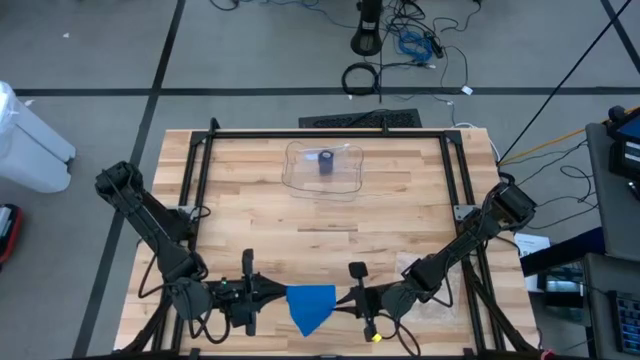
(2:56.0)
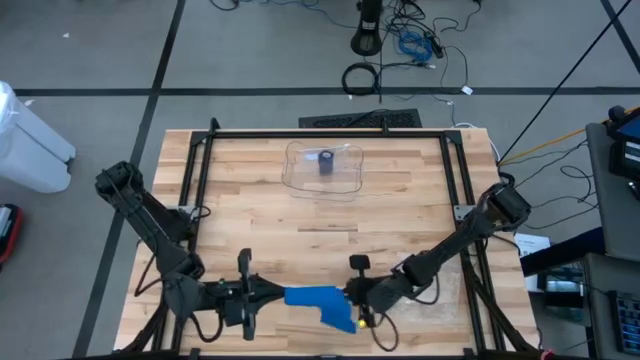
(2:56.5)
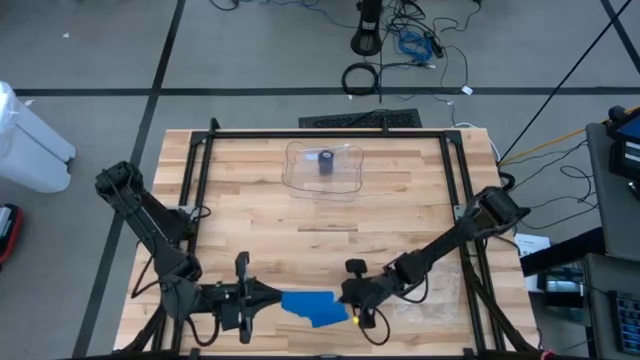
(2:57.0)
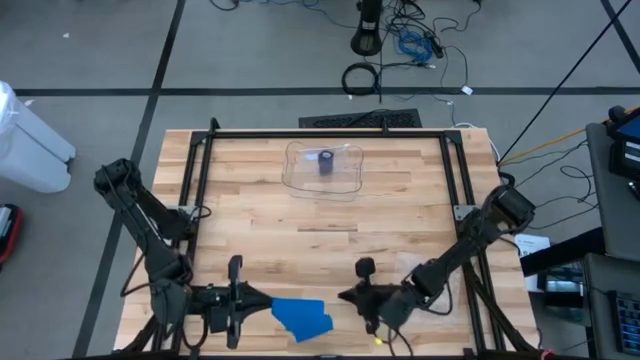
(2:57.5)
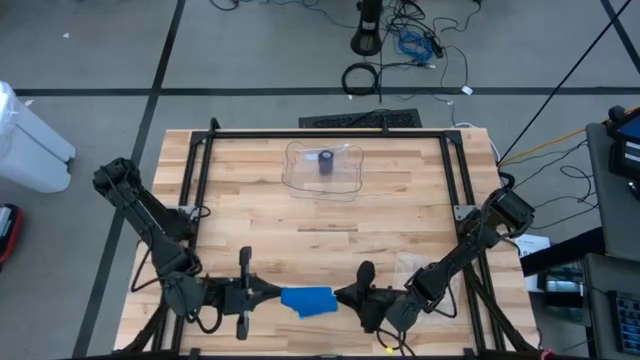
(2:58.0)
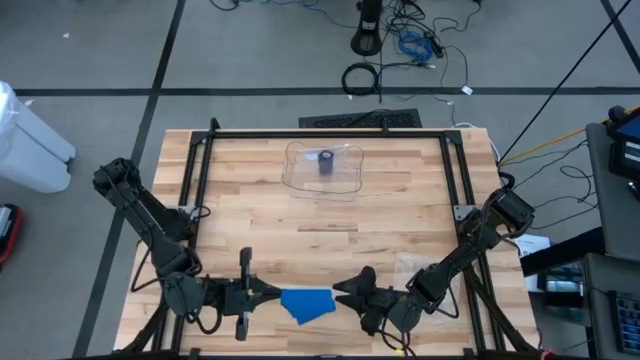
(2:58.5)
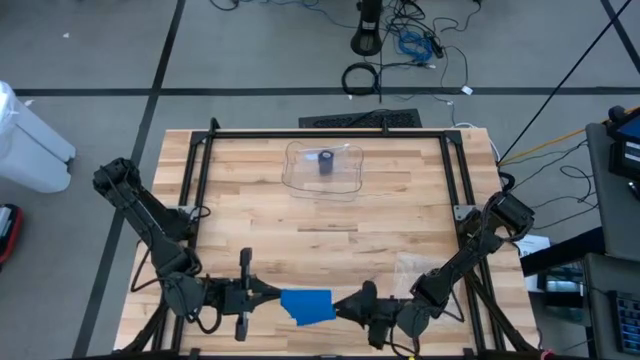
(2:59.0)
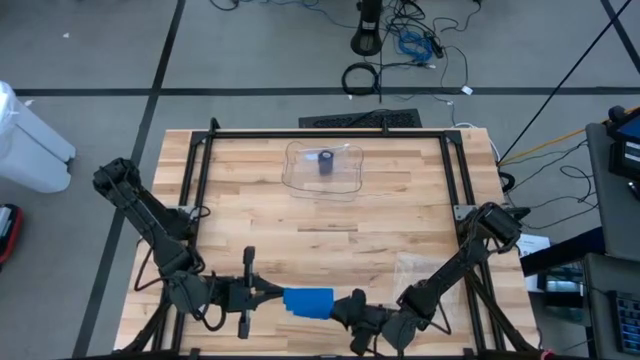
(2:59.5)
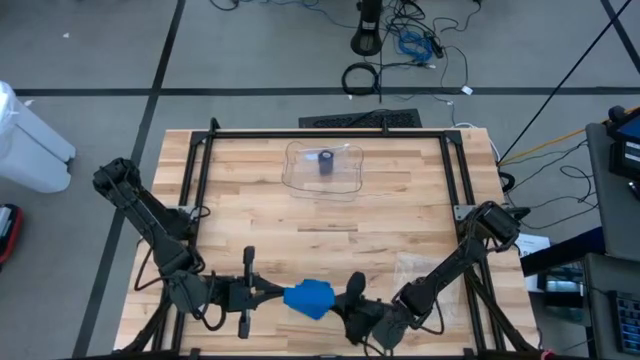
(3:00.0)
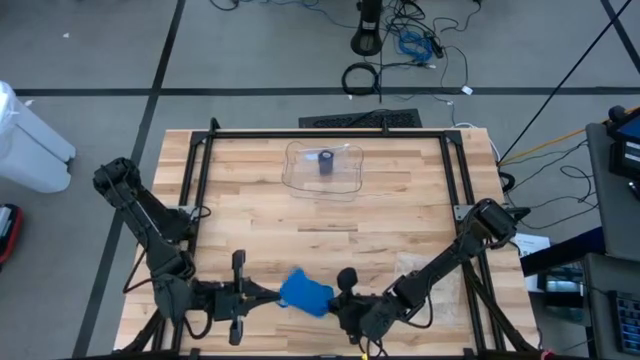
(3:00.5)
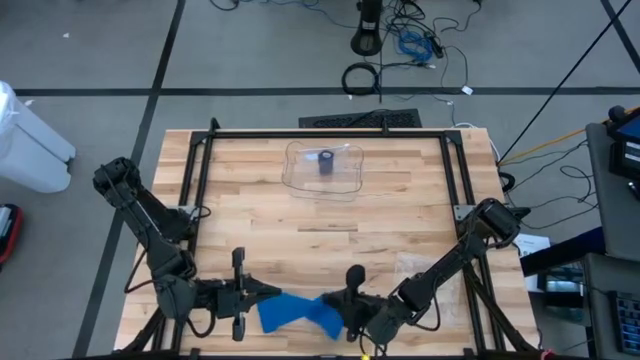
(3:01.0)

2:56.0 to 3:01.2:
Task: Roll bandage
Roll the blue bandage

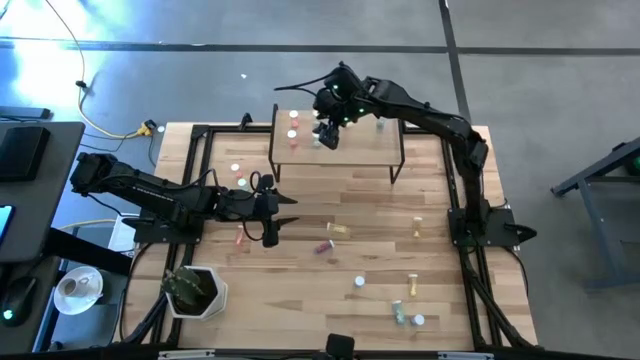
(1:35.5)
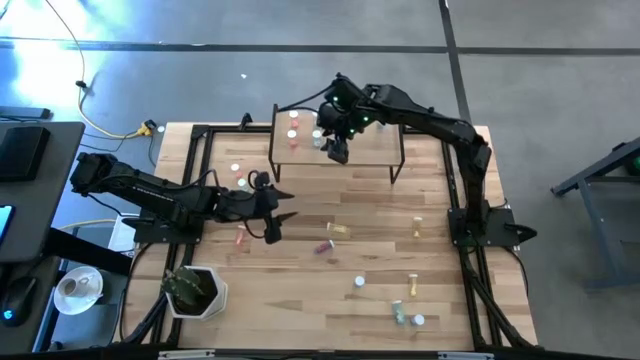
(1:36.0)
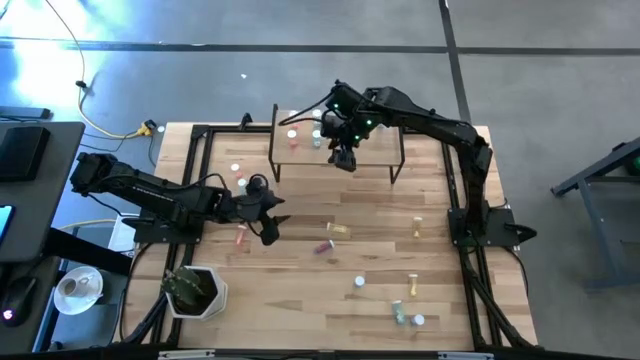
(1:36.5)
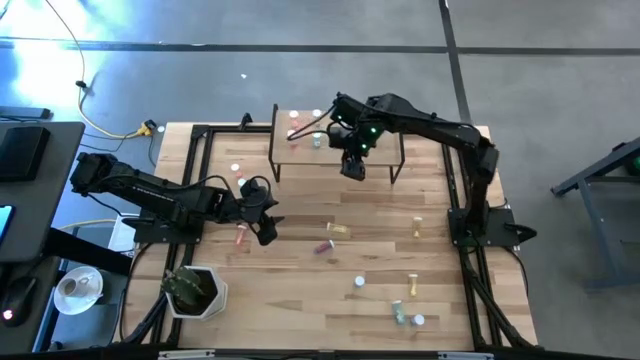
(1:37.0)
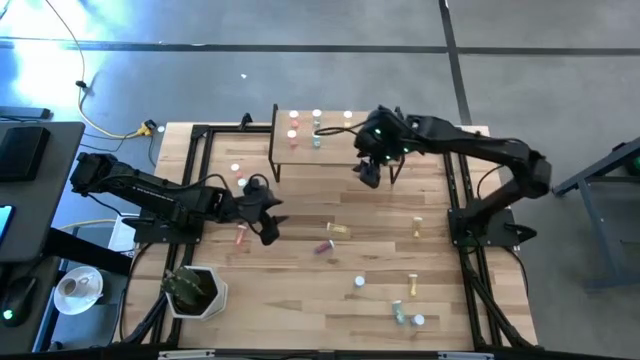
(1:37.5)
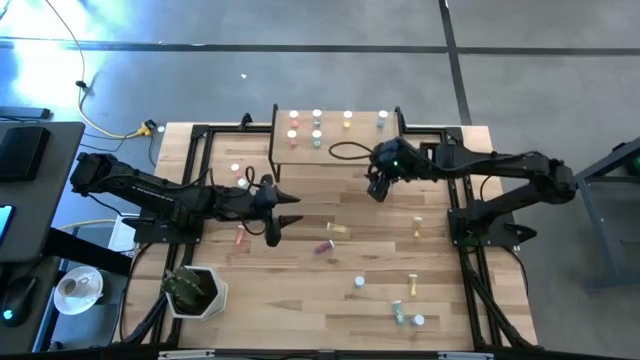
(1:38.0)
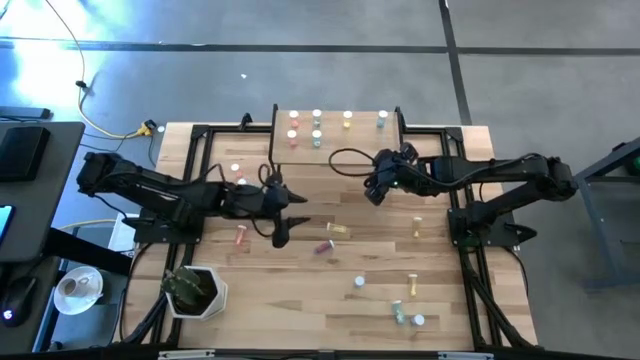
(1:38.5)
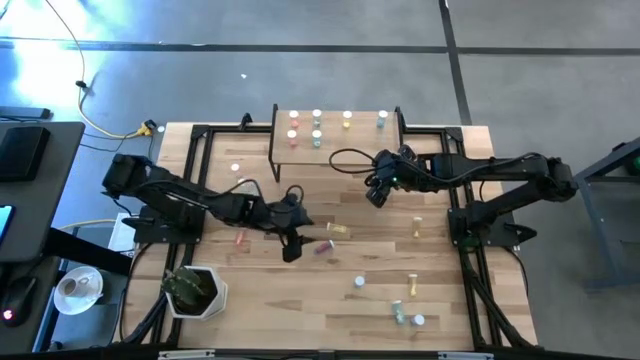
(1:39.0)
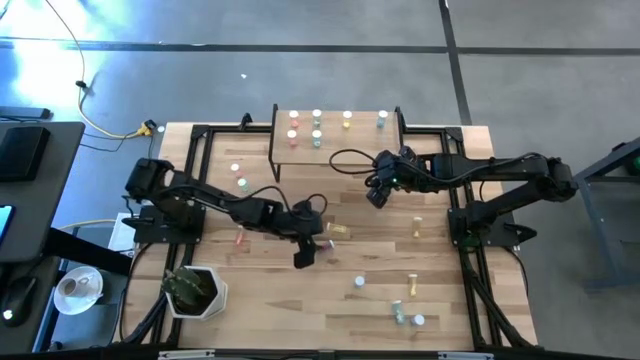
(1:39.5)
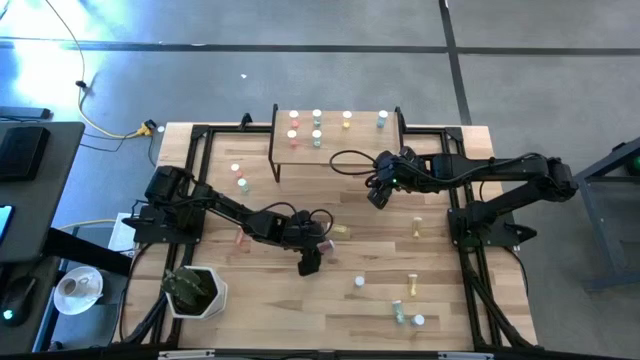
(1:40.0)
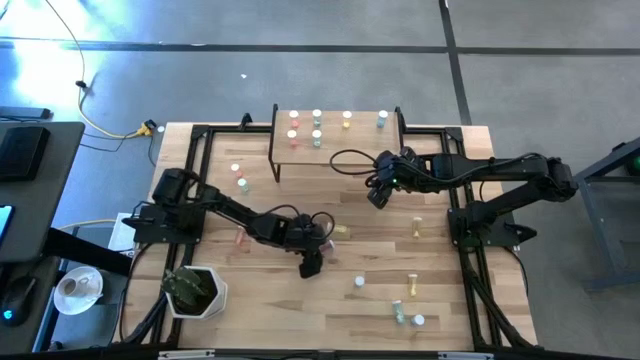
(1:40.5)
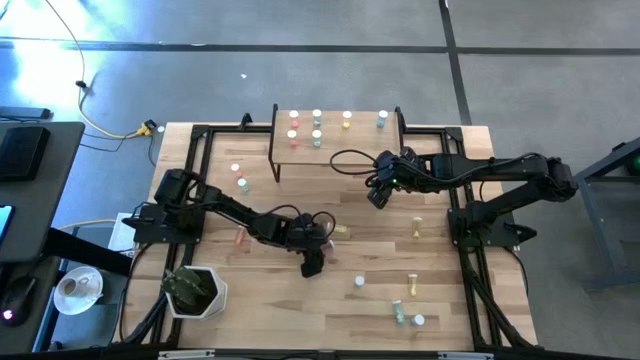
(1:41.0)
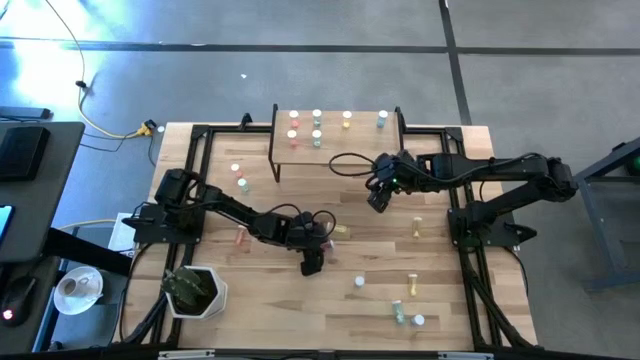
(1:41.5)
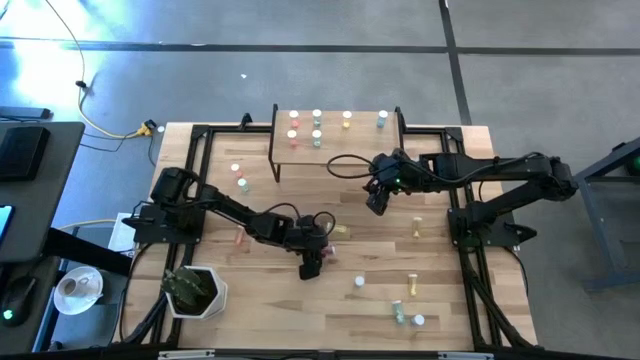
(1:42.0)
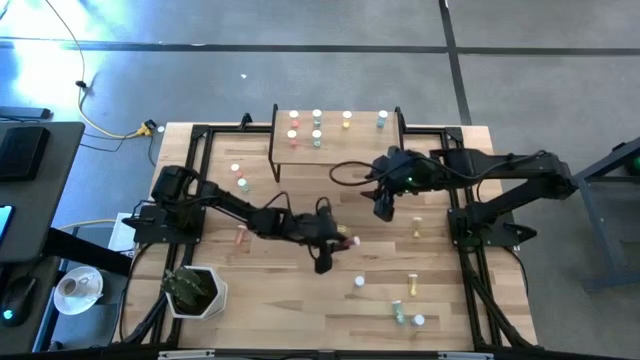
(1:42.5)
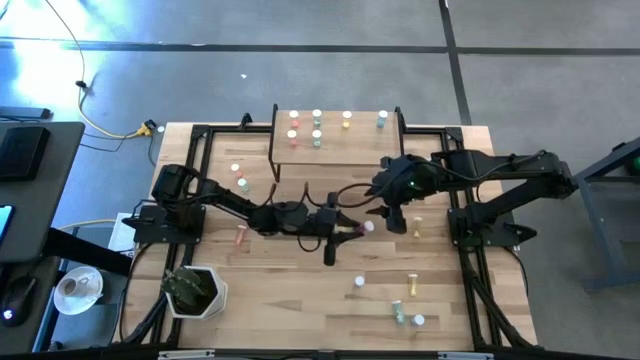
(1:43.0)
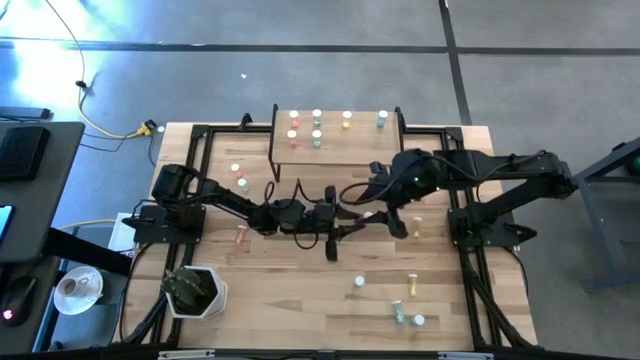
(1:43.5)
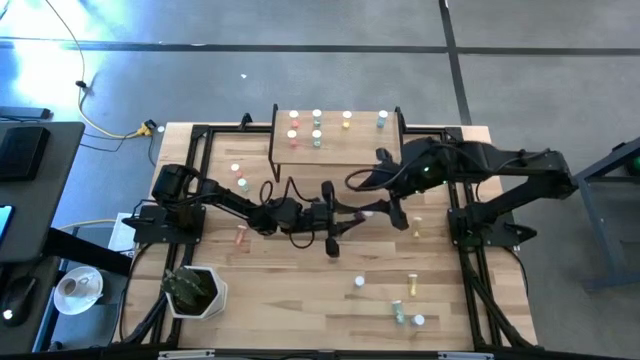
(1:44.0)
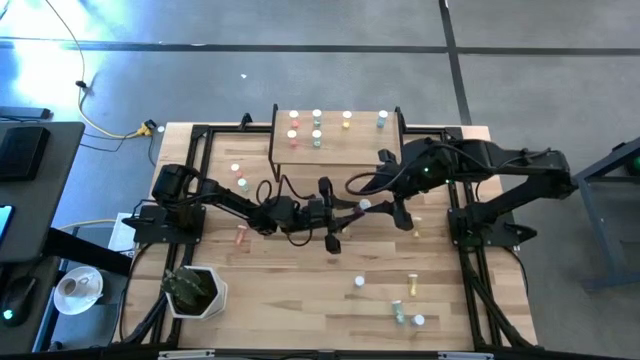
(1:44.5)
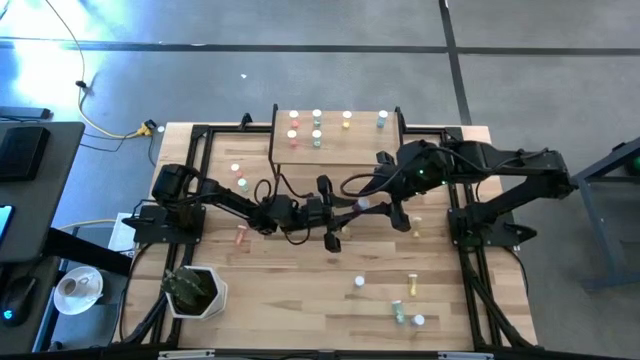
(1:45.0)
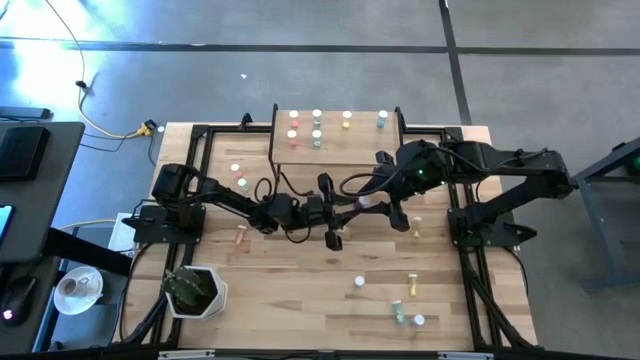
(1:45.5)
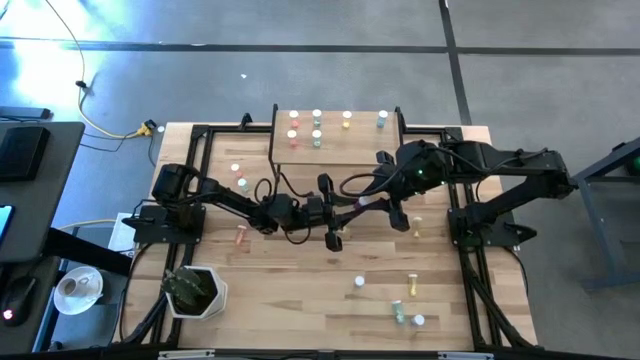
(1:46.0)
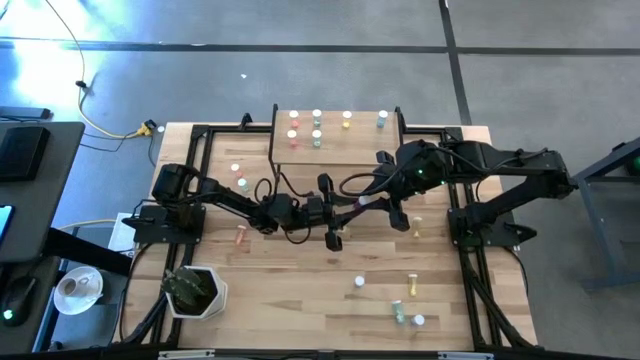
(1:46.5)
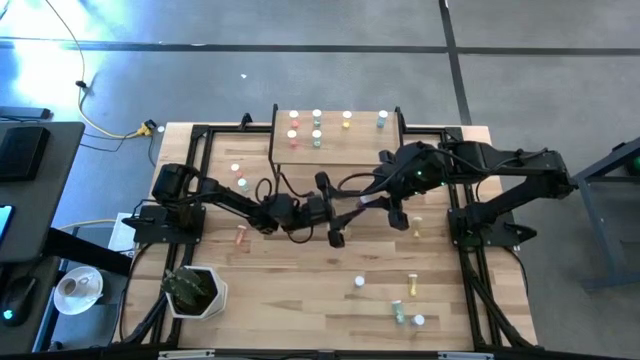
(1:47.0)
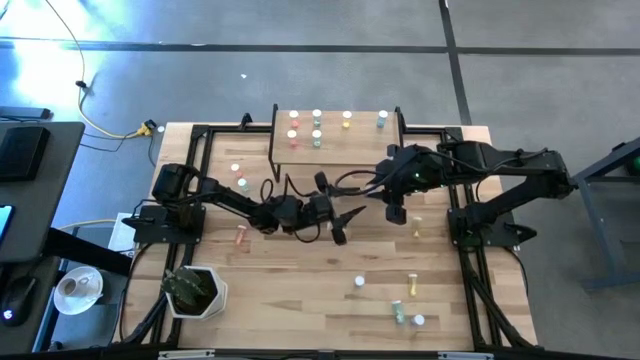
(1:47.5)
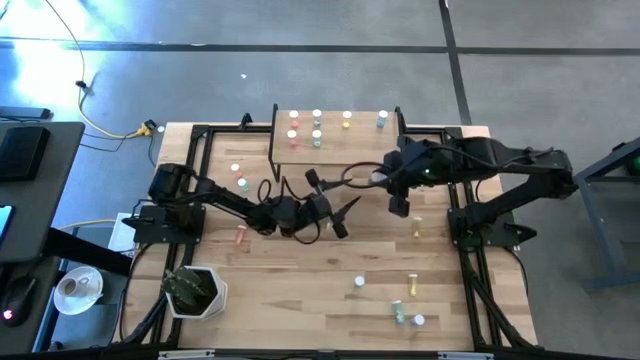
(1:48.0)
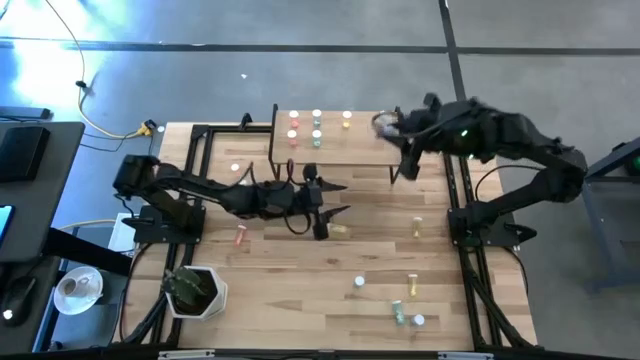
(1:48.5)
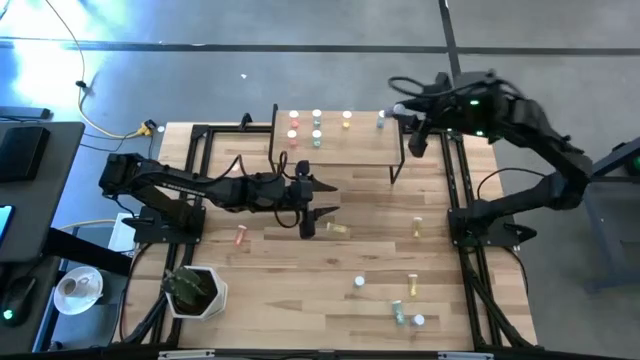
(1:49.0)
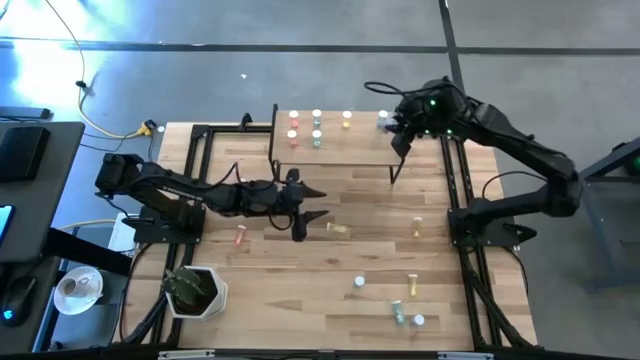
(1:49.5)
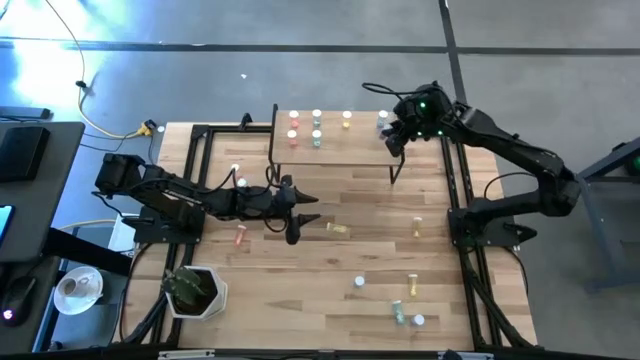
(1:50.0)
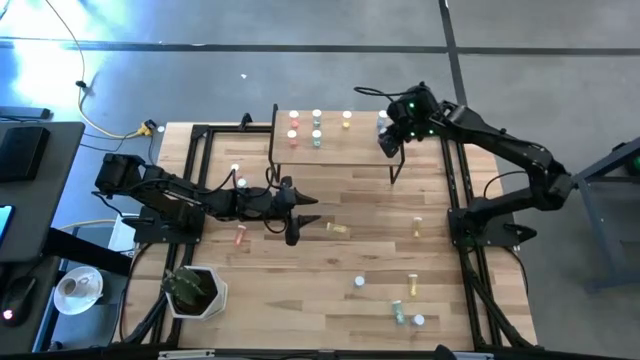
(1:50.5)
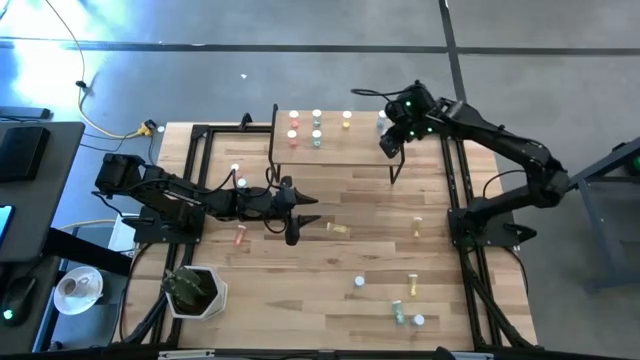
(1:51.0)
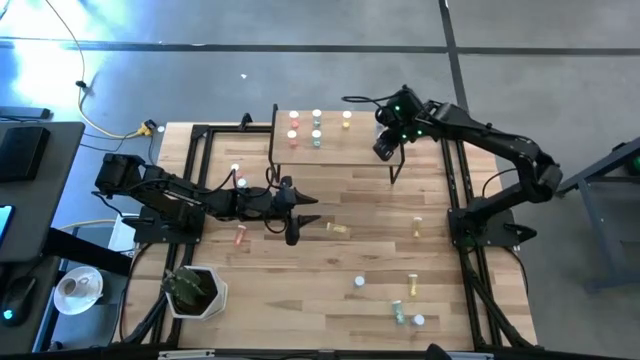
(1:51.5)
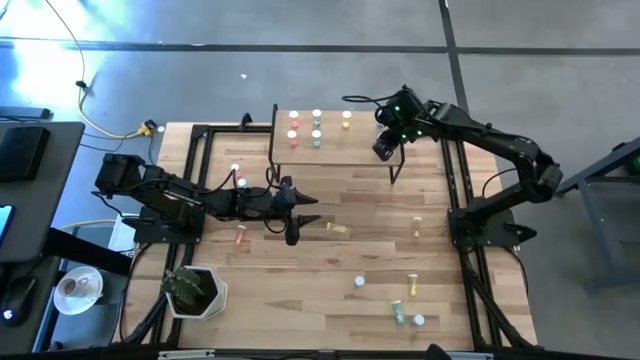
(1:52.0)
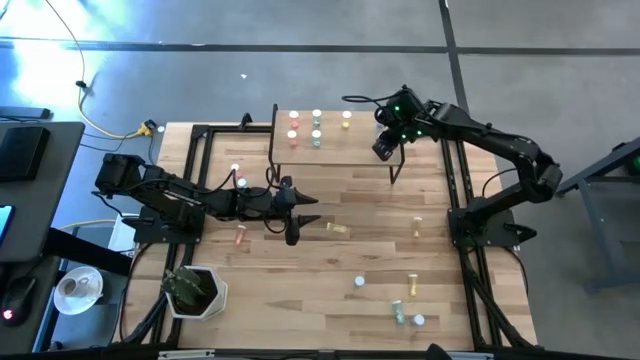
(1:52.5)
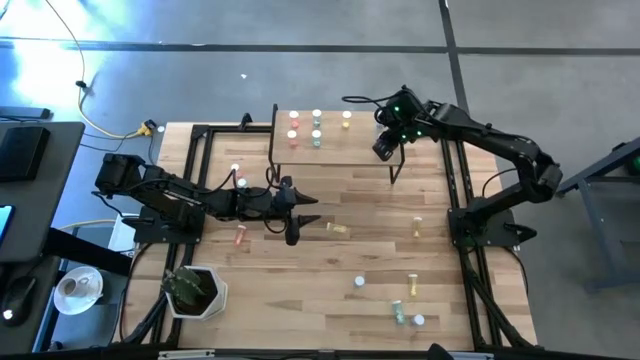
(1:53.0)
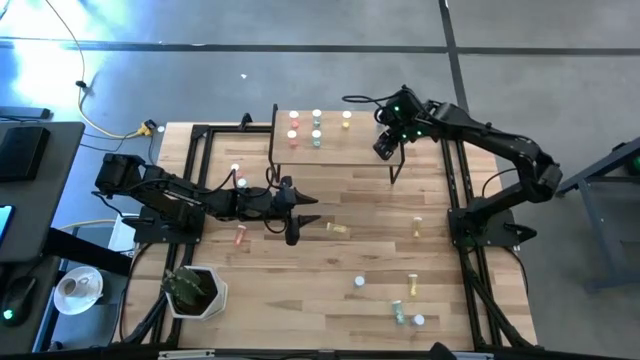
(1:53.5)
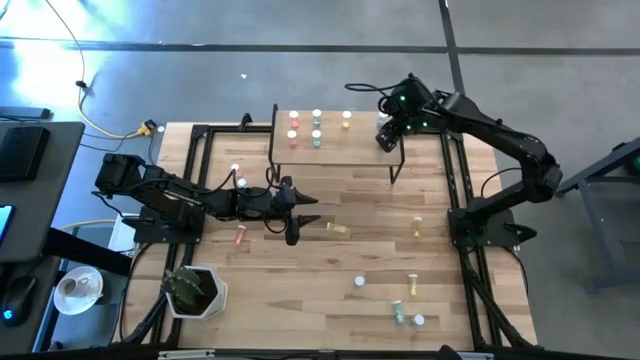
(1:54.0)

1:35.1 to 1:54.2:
Task: Pick and place medicine bottles onto shelf by color
Put the blue medicine bottle on the shelf
